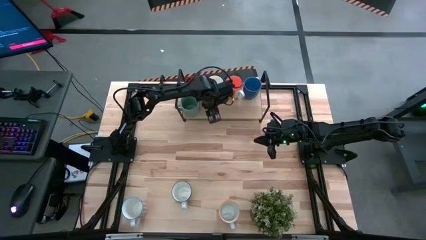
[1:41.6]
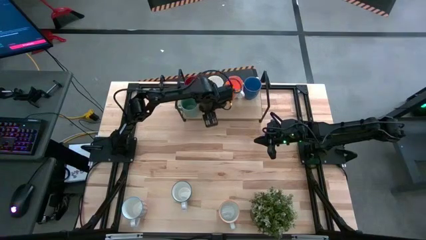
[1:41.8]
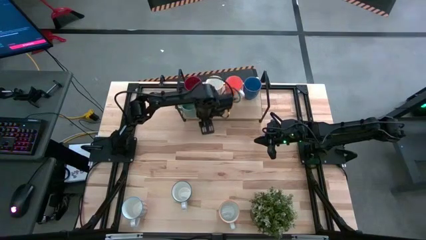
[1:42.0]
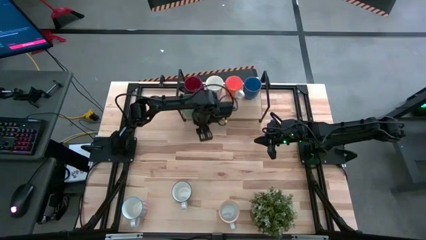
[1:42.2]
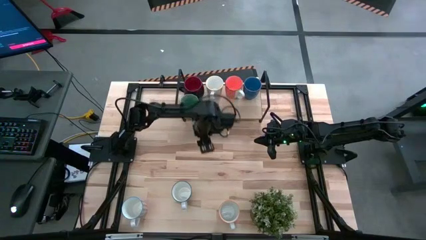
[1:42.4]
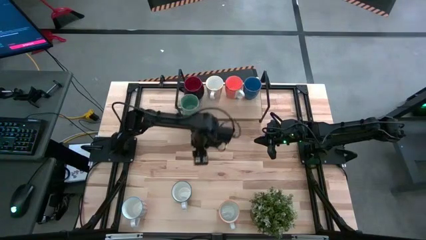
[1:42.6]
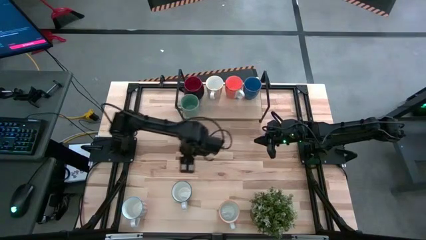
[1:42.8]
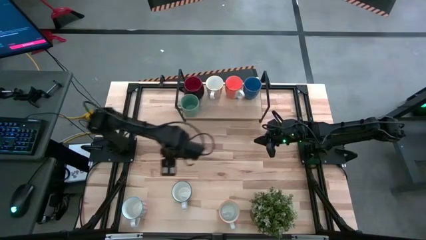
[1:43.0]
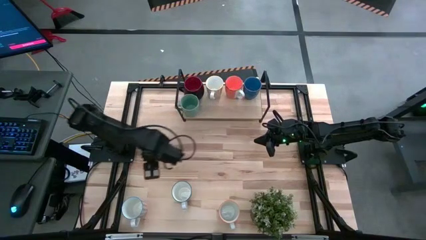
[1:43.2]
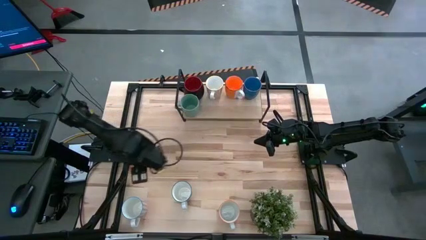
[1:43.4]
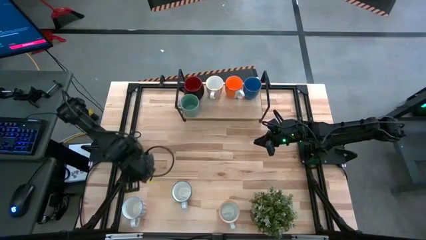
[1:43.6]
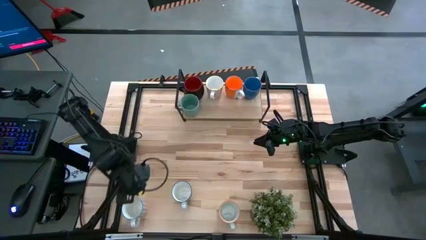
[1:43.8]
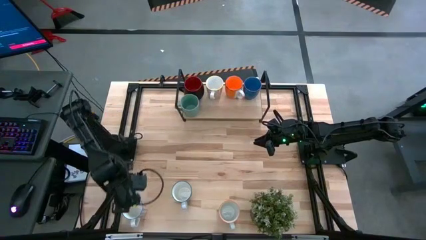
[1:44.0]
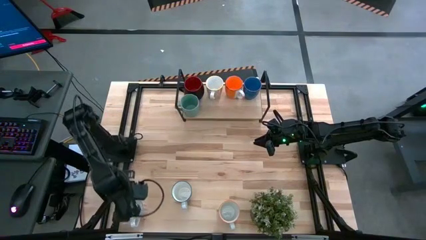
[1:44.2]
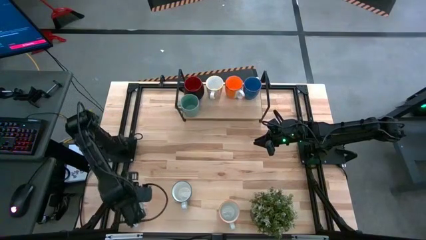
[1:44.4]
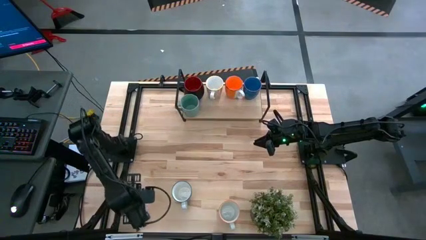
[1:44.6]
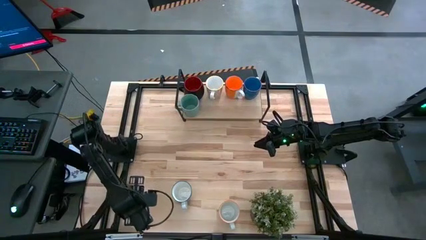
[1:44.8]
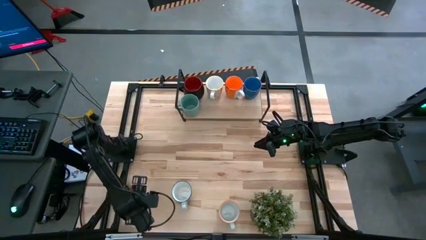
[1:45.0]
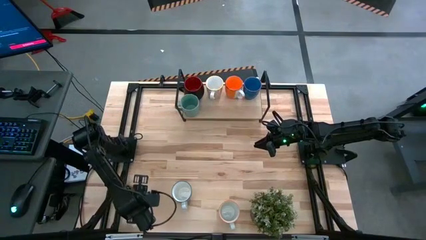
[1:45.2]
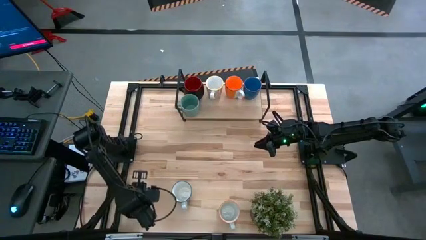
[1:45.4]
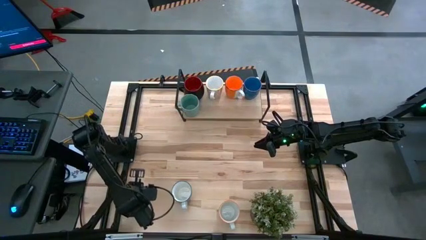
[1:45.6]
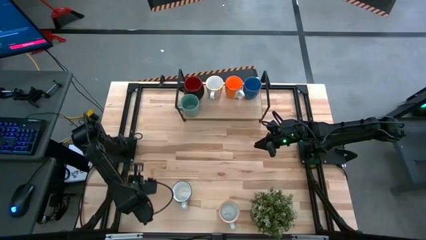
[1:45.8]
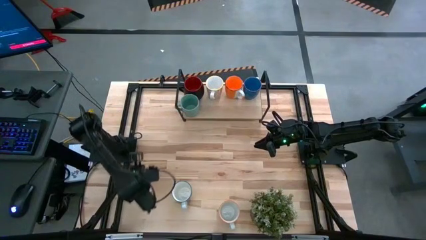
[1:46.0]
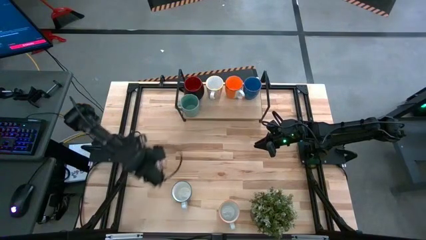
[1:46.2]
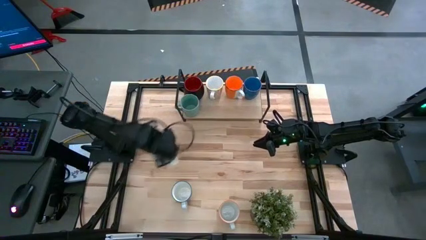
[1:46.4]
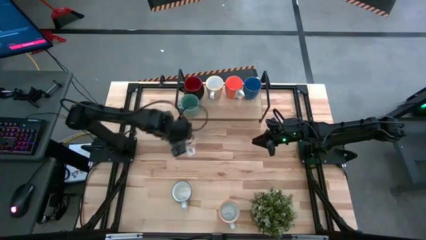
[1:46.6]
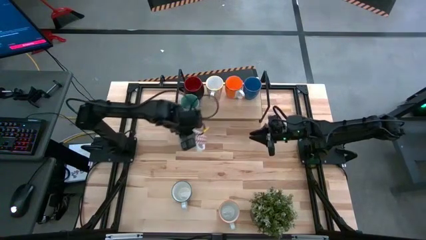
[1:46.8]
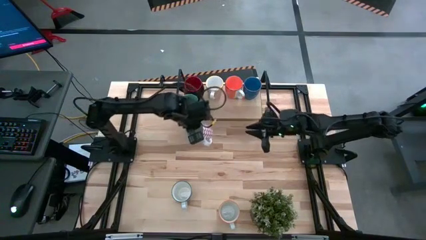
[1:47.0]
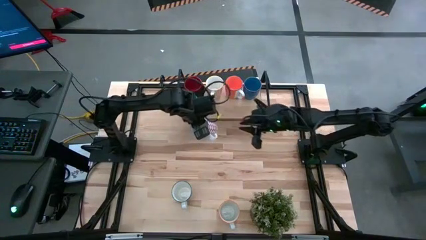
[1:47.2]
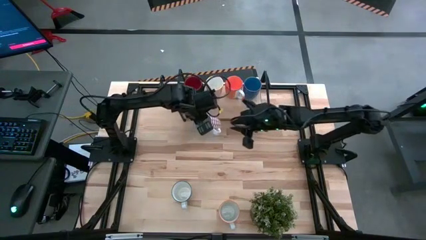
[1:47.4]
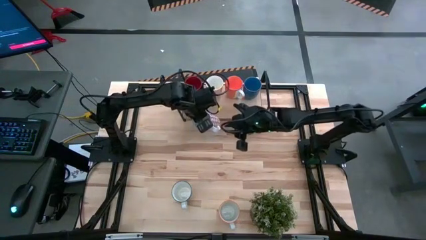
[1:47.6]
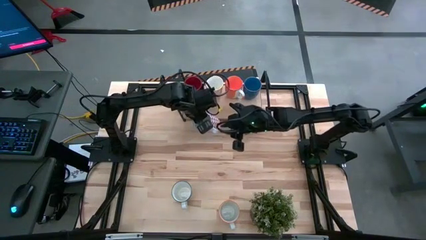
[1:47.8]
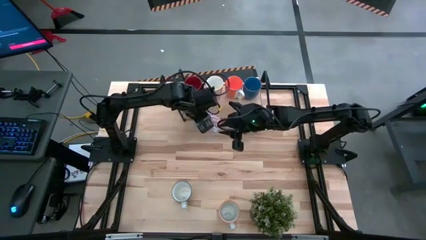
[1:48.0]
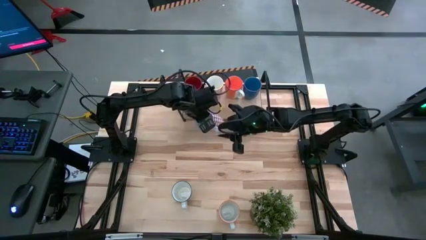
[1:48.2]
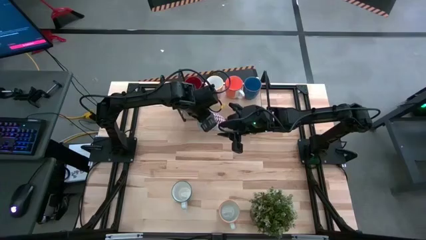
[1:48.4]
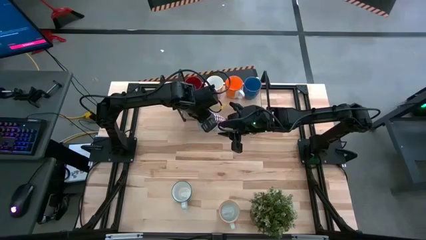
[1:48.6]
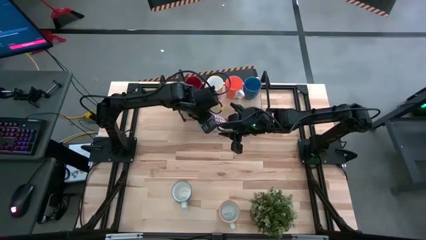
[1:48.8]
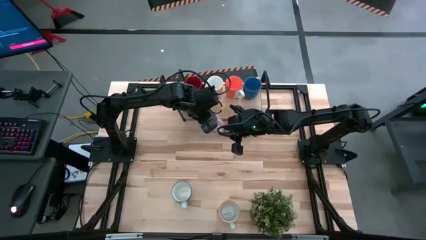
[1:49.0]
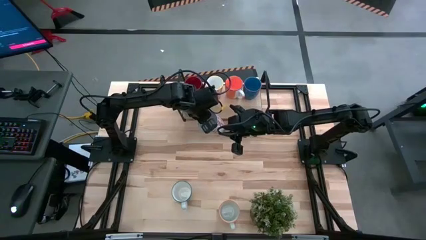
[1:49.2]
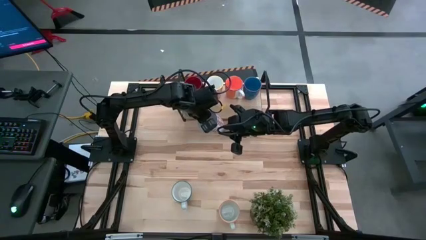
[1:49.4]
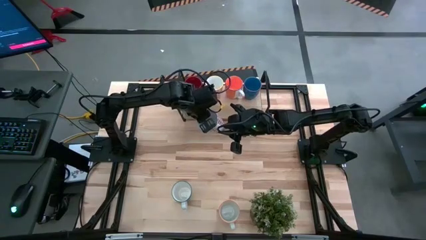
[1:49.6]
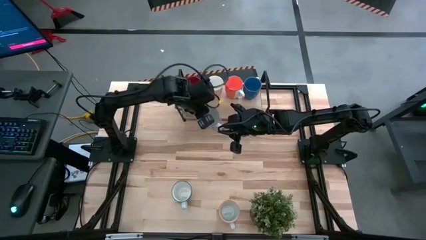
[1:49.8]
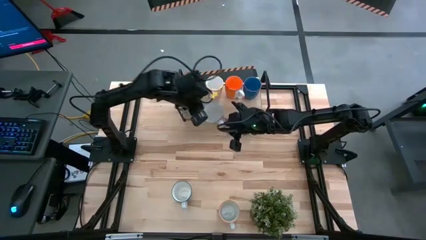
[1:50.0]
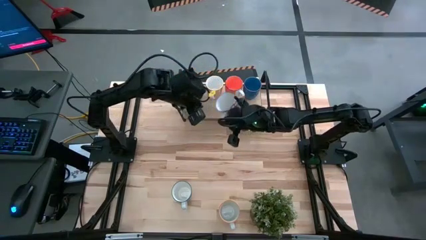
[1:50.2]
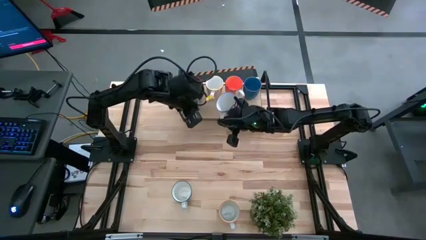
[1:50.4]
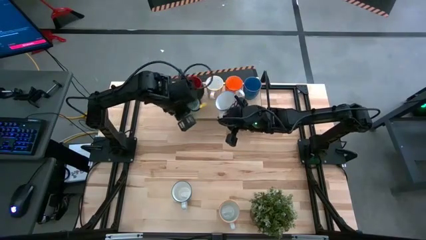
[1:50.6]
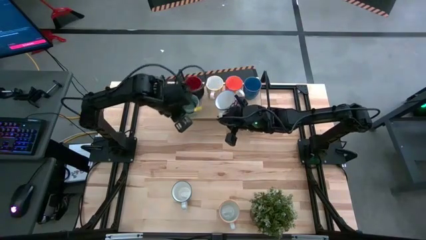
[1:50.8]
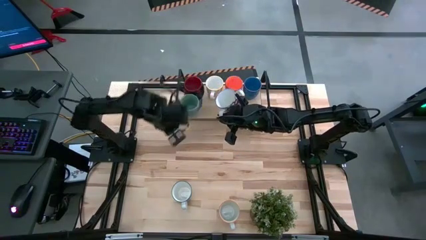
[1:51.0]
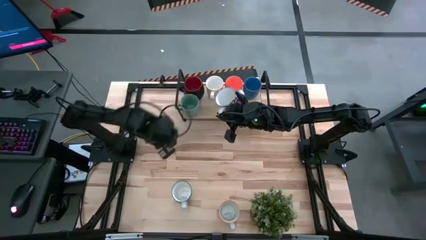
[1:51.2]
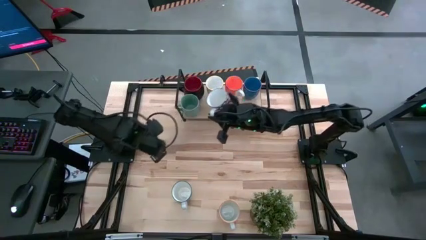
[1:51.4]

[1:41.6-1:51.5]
Task: Place coffee mugs
Put the red pattern mug on the shelf

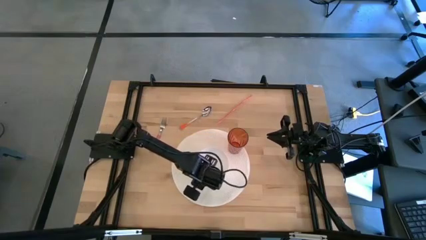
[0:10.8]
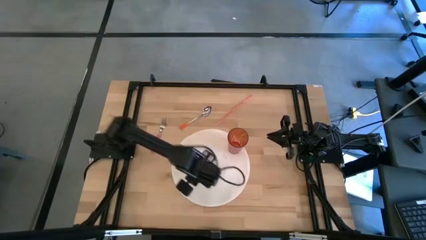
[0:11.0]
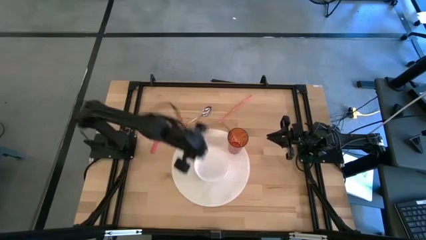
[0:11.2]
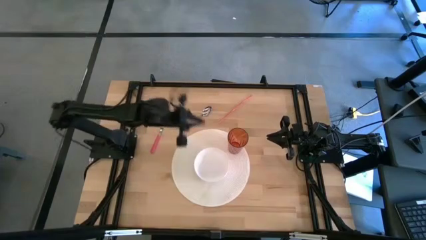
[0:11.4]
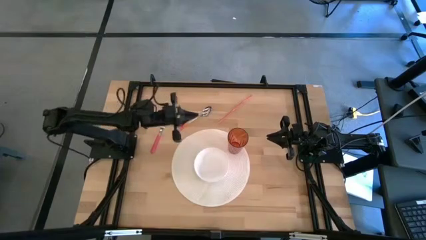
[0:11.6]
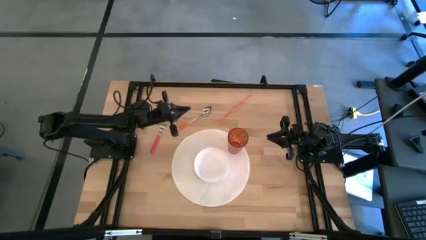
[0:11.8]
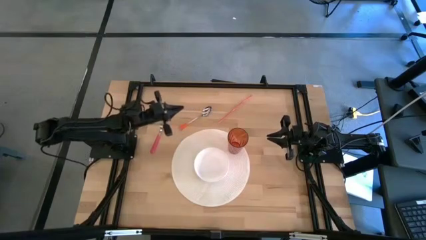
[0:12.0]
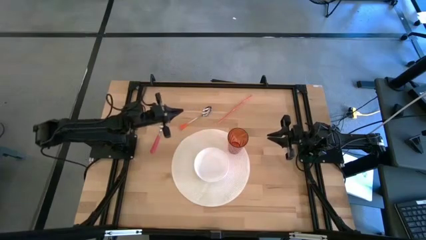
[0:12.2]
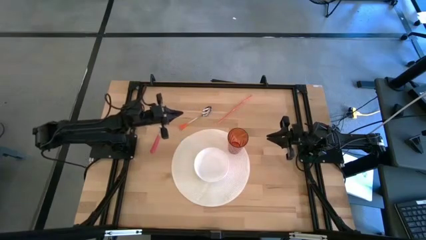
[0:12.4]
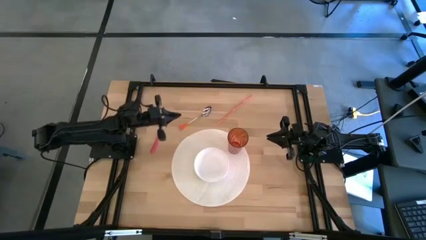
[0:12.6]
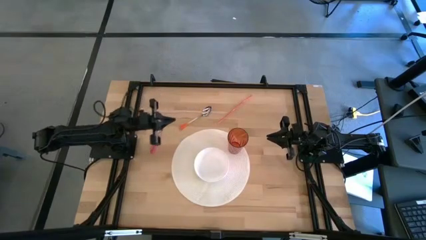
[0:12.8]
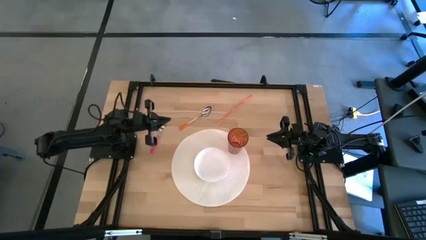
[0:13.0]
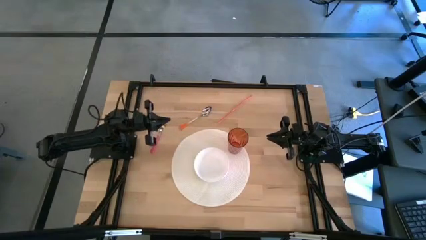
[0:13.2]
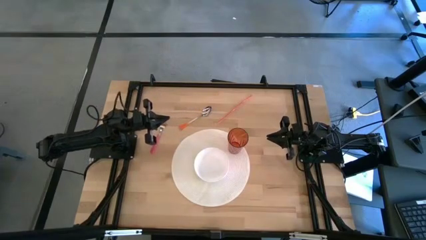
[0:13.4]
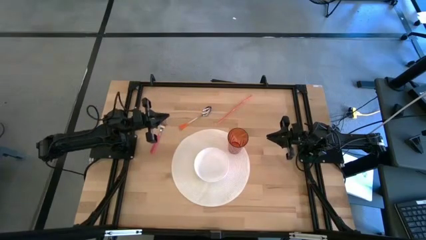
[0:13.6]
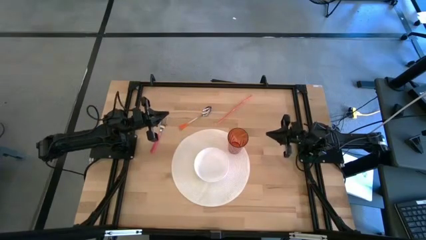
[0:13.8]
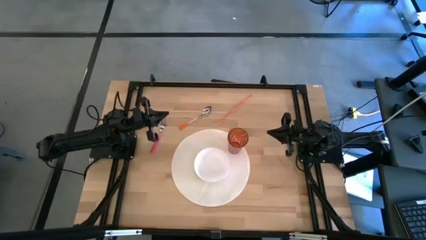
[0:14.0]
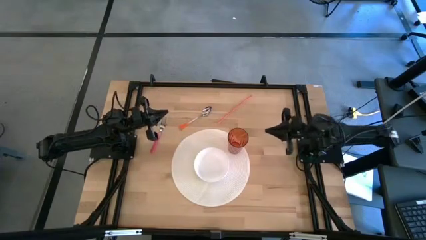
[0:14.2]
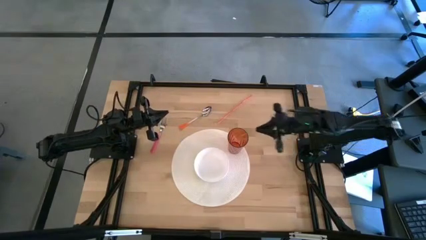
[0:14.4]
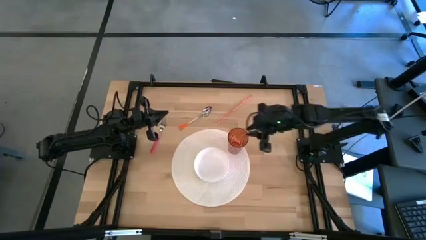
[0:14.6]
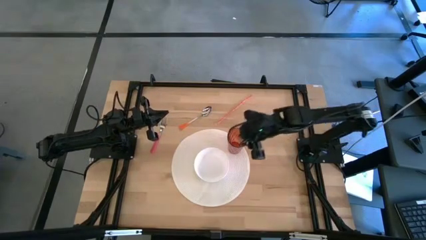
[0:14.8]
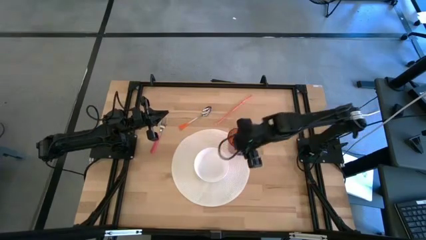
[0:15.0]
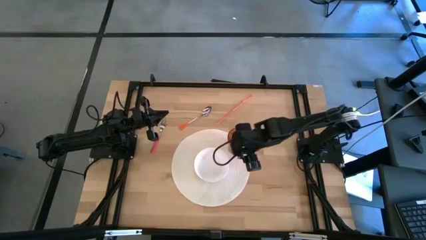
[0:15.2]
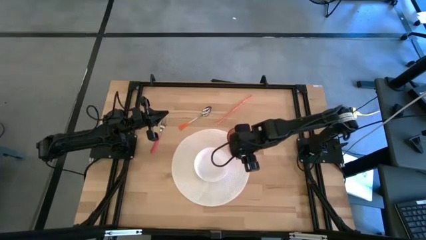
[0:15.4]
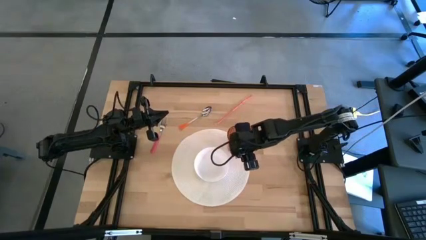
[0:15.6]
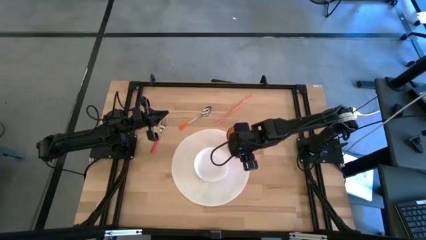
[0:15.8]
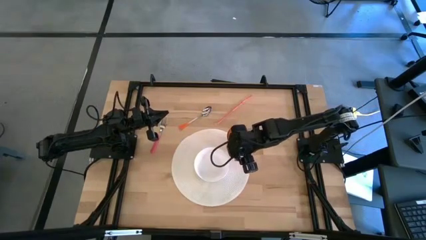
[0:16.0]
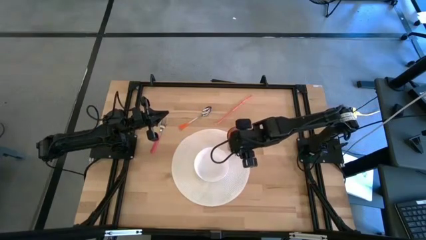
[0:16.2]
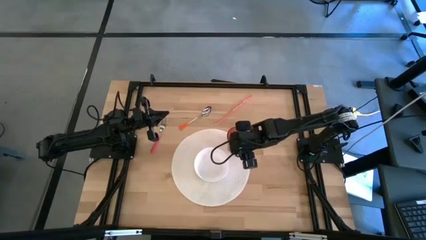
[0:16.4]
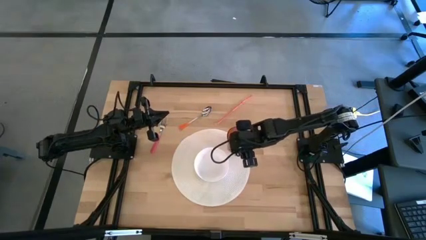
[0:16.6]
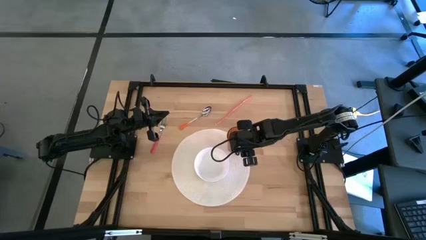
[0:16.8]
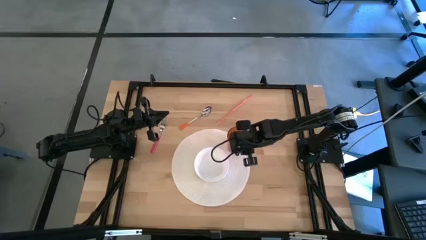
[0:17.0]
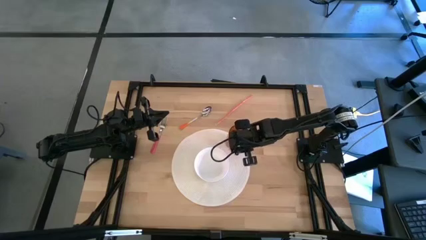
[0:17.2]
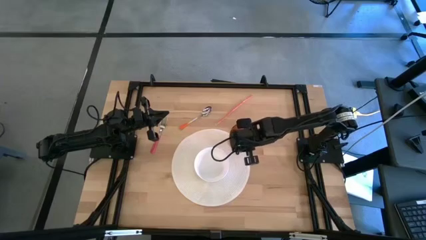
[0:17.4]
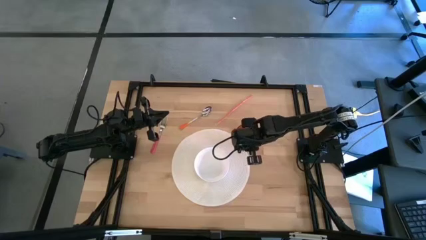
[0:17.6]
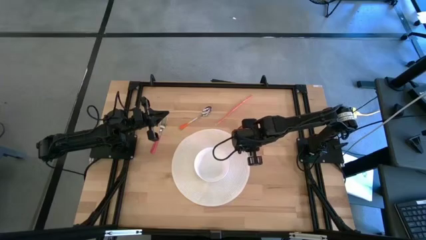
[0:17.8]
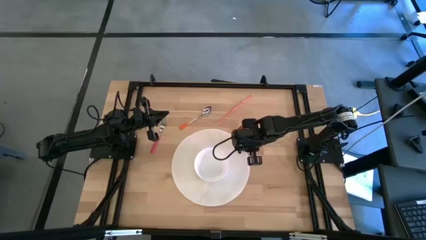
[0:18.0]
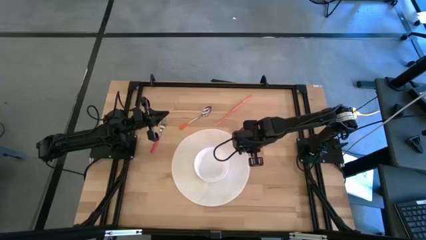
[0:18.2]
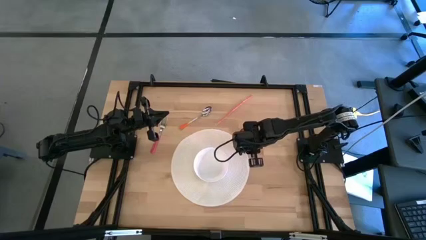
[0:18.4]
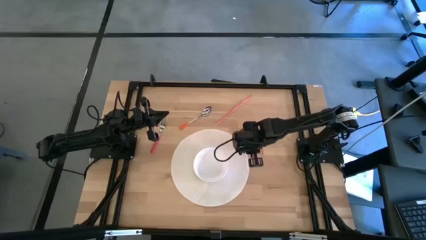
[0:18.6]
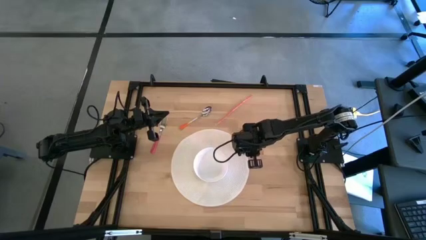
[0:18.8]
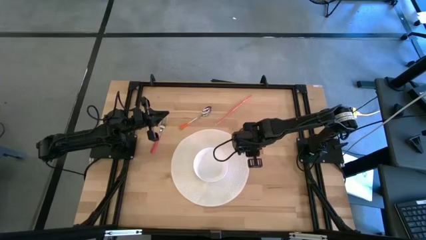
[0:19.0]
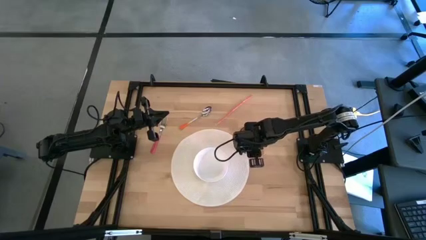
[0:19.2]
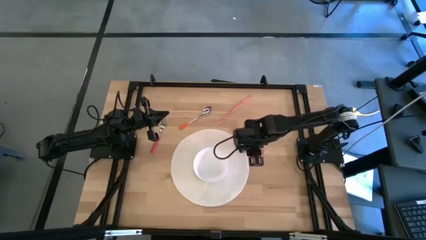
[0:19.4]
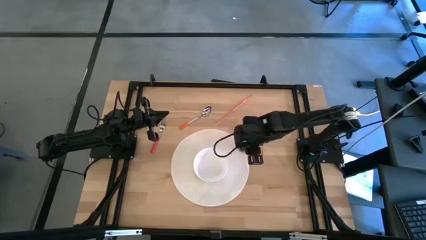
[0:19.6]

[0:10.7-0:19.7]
Task: Pick & Place Utensil
Adjust the brown cup on the mat
